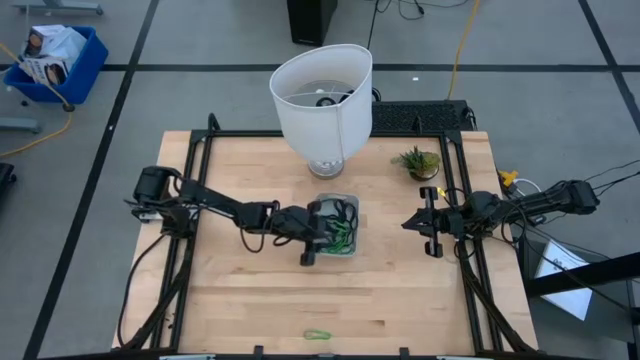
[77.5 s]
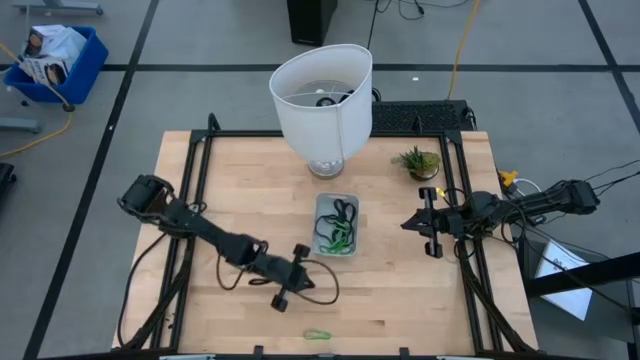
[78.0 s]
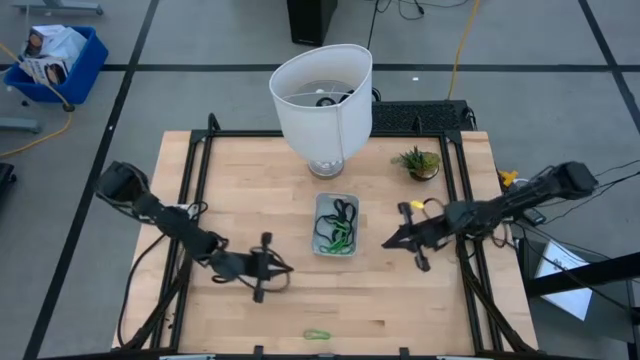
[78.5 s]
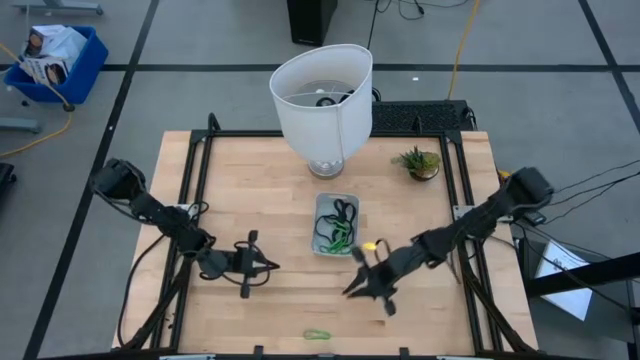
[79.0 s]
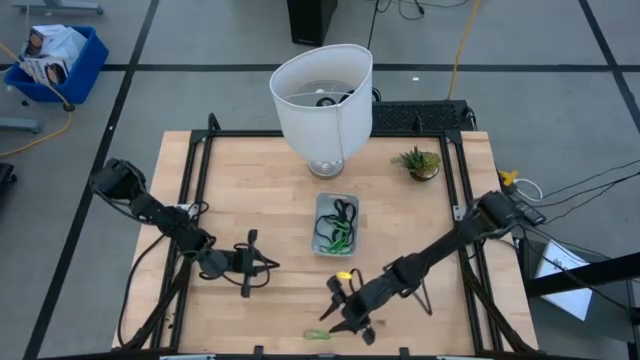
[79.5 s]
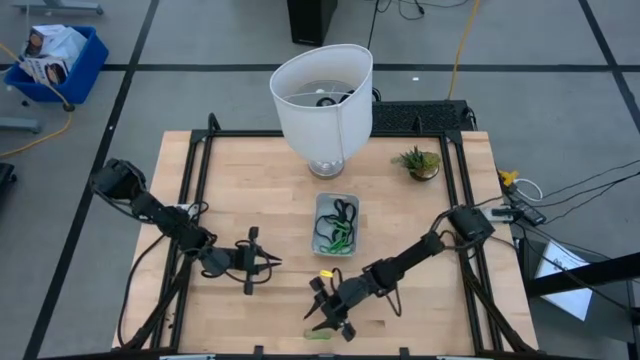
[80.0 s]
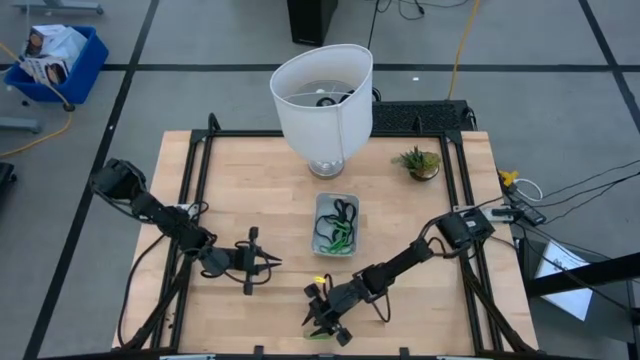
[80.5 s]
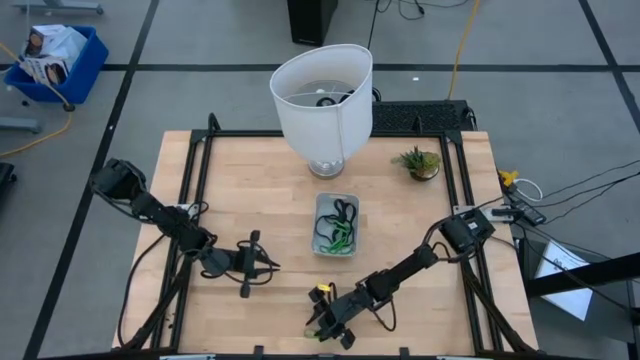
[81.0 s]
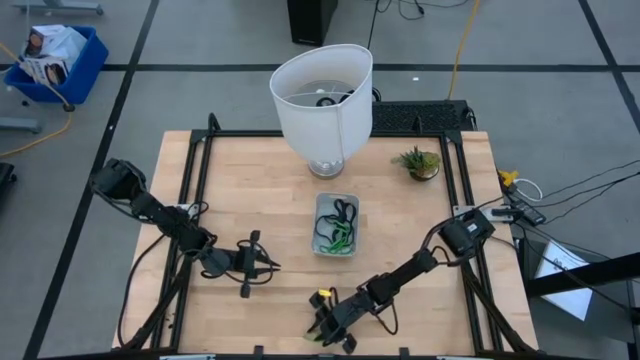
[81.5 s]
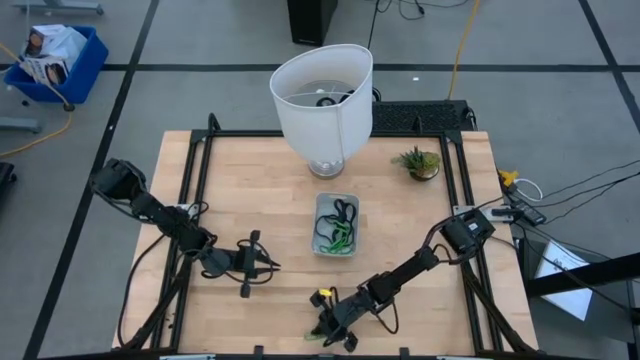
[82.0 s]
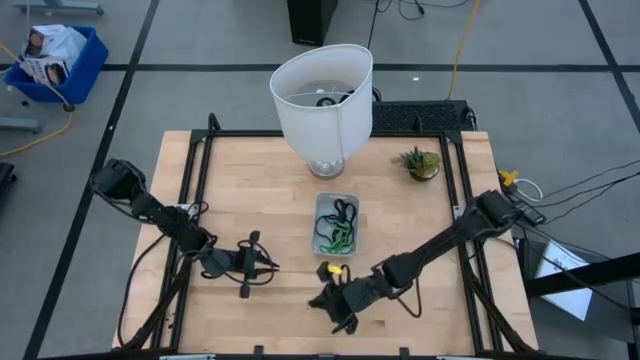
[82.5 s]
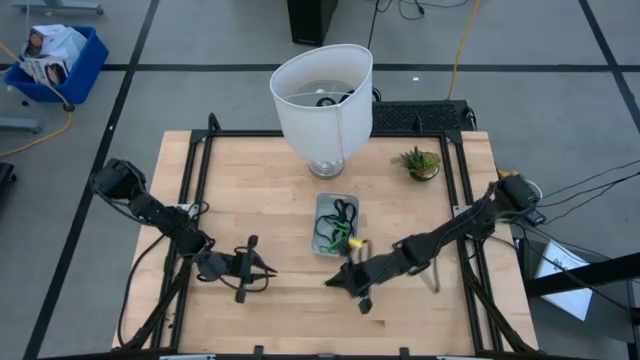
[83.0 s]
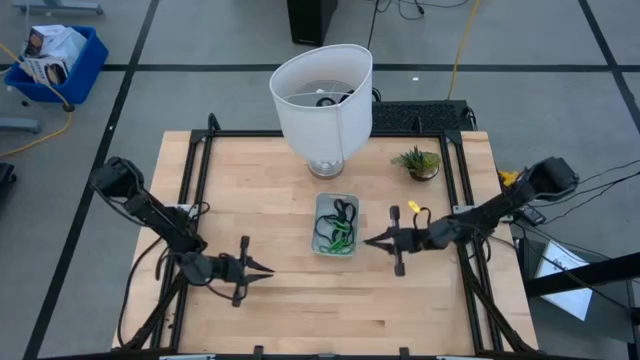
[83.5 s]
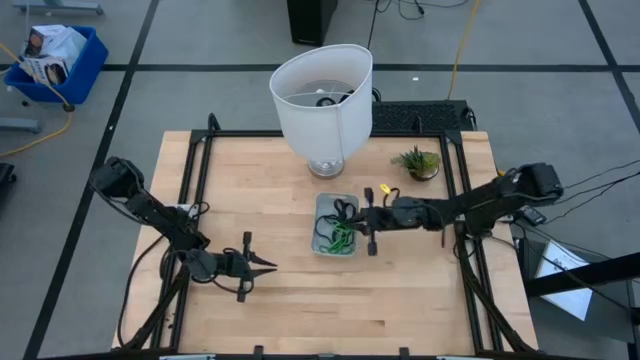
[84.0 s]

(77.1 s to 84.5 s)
Task: Pick and place rubber bands into bin
Put the green rubber band into the gray bin

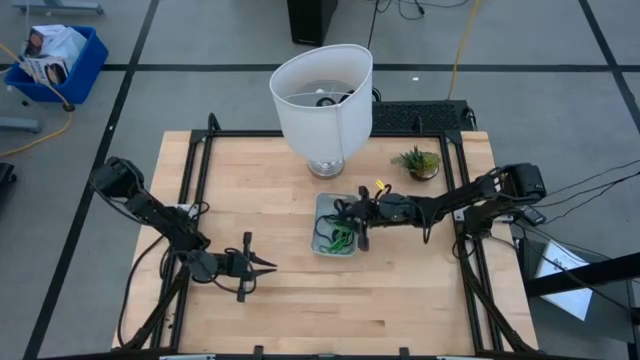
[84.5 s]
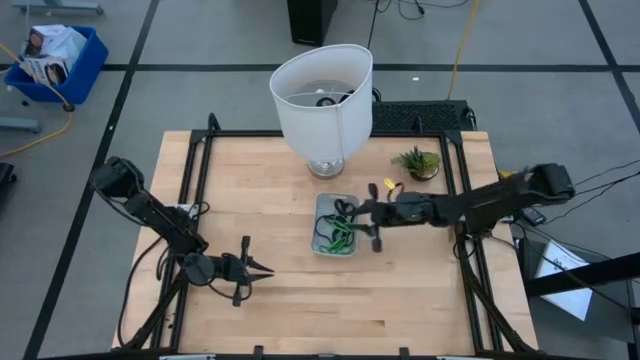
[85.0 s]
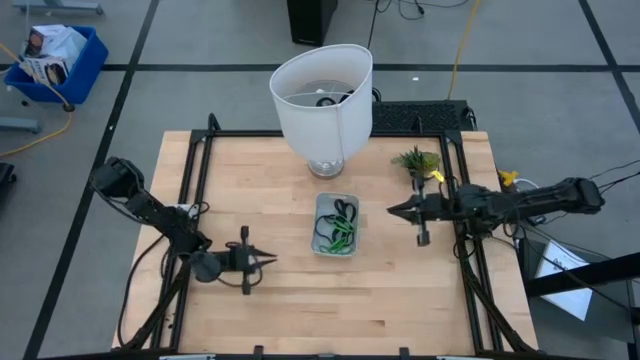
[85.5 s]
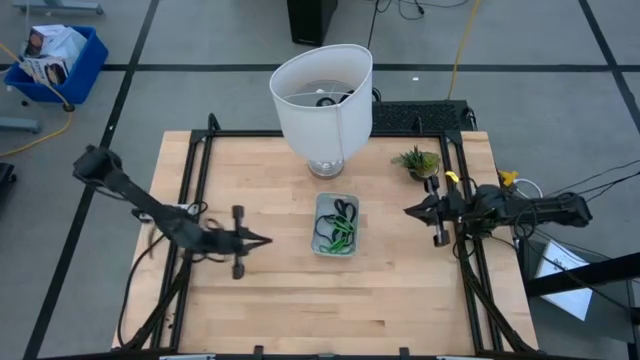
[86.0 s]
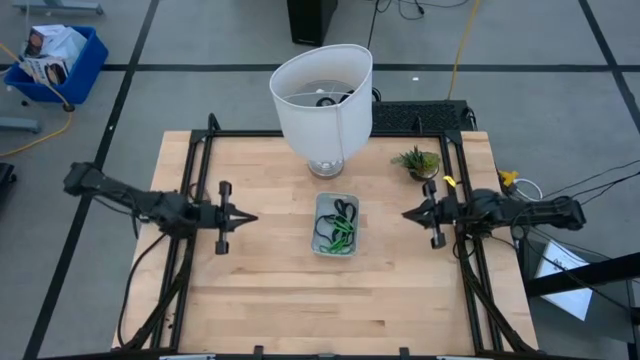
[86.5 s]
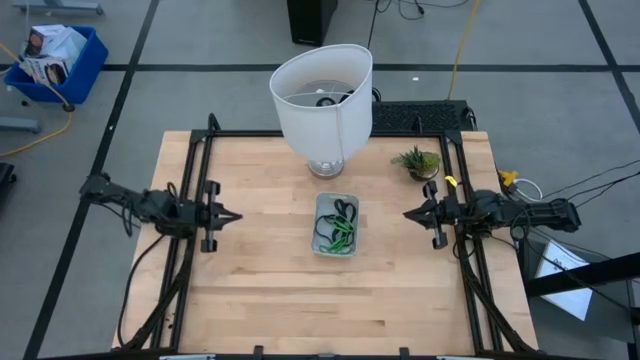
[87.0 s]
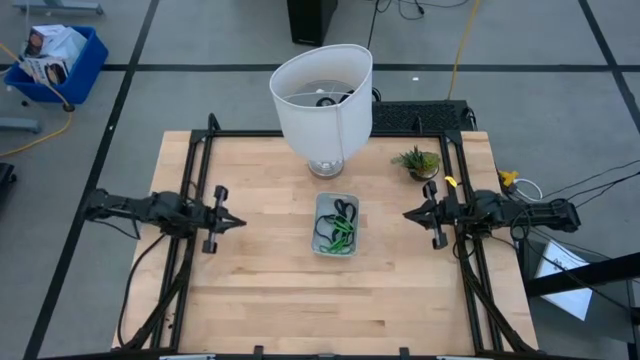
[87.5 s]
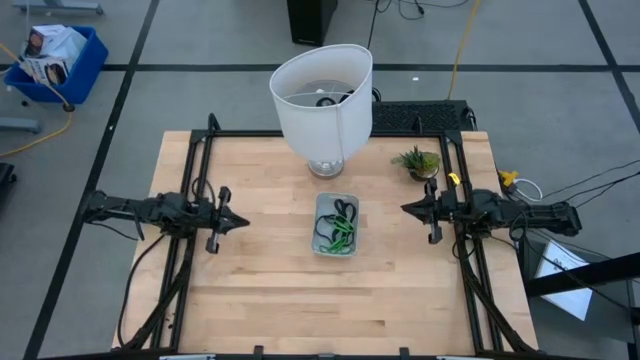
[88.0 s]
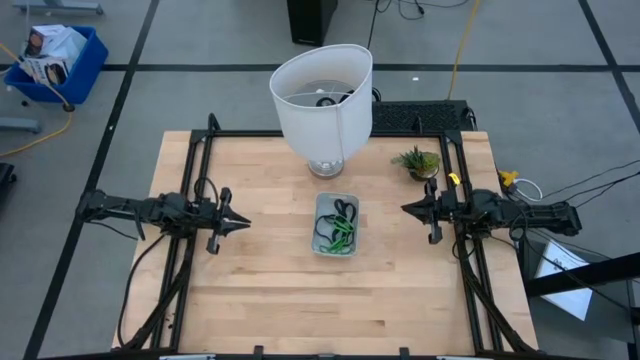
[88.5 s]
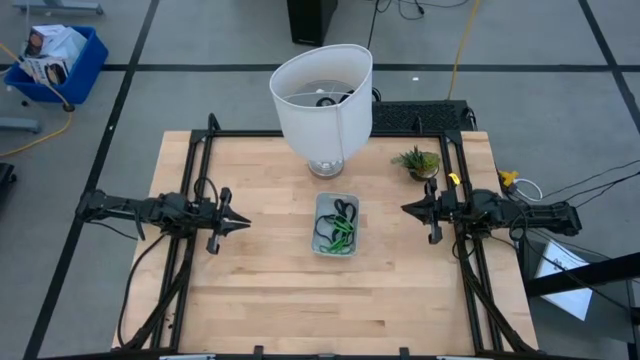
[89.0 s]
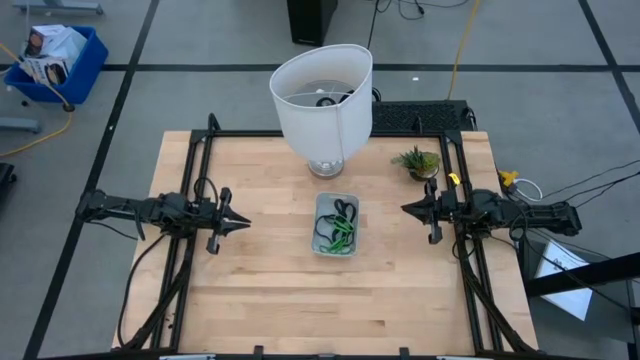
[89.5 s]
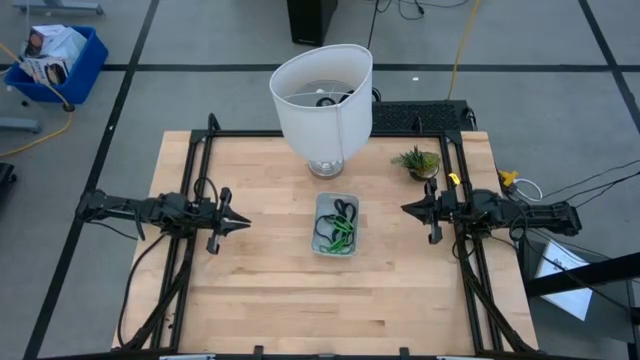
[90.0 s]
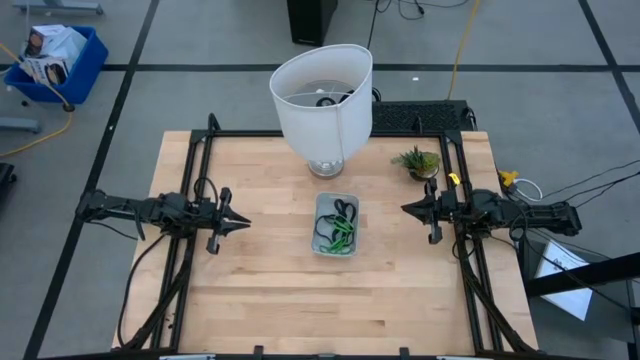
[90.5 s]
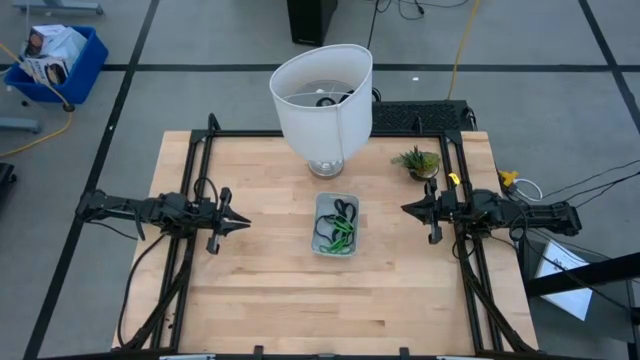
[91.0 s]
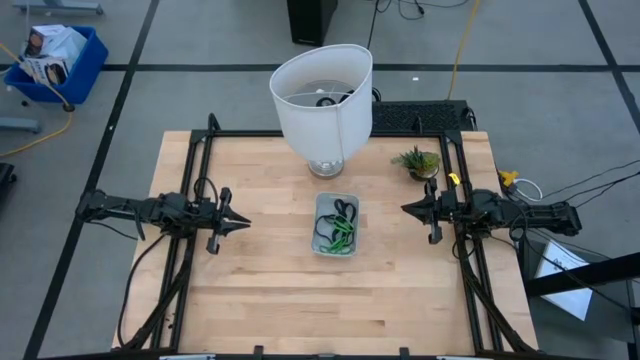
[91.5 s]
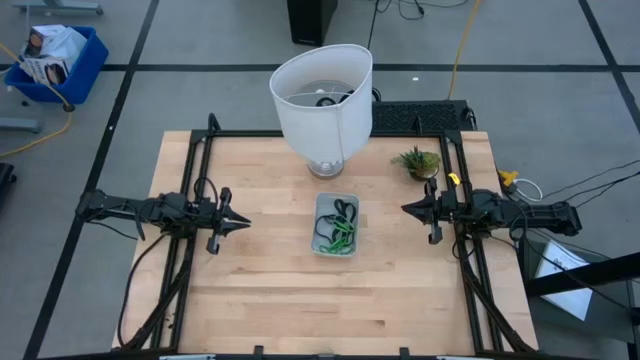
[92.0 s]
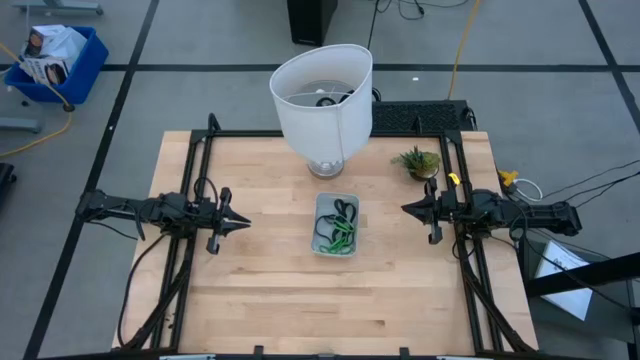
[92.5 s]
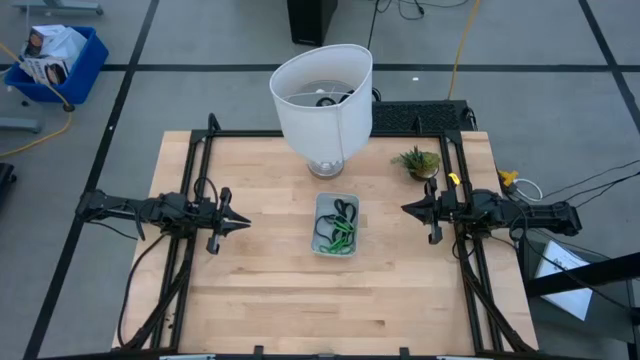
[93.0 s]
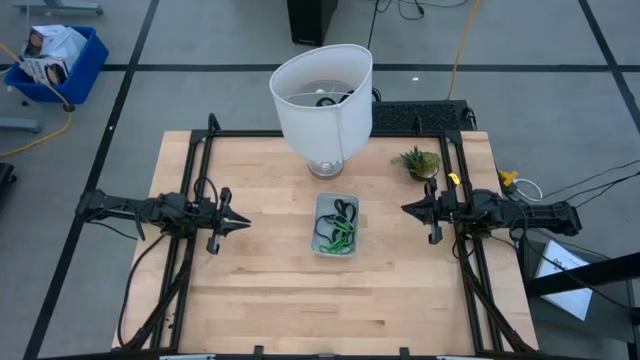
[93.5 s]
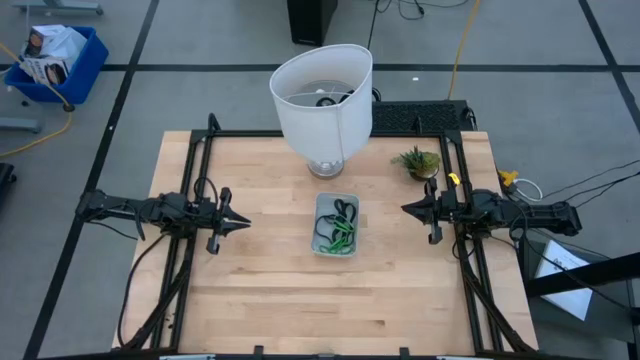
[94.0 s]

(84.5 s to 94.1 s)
Return to Home Position

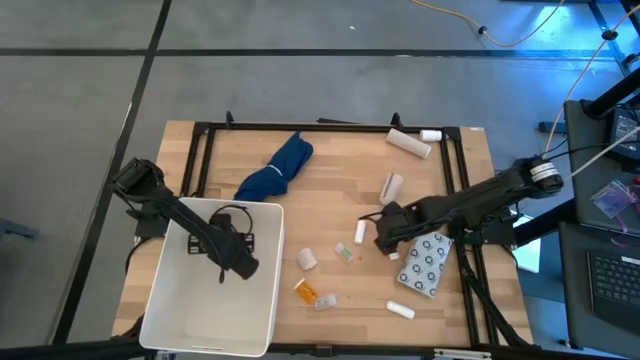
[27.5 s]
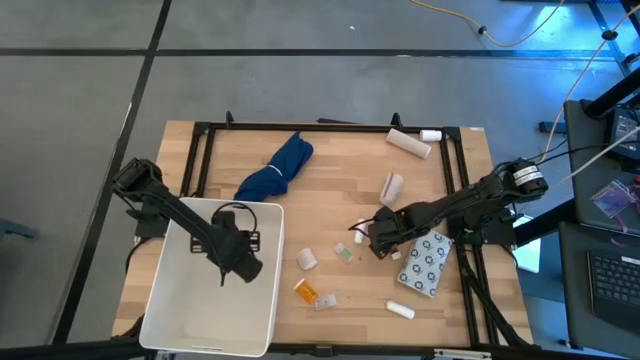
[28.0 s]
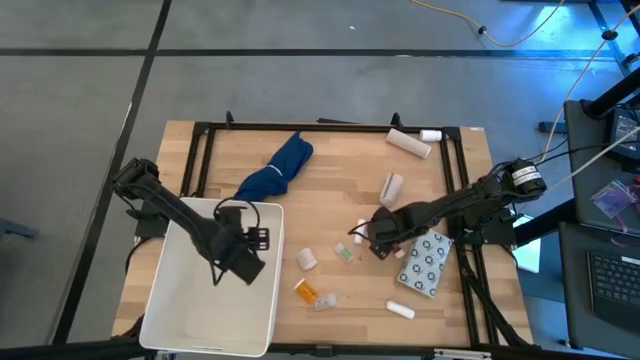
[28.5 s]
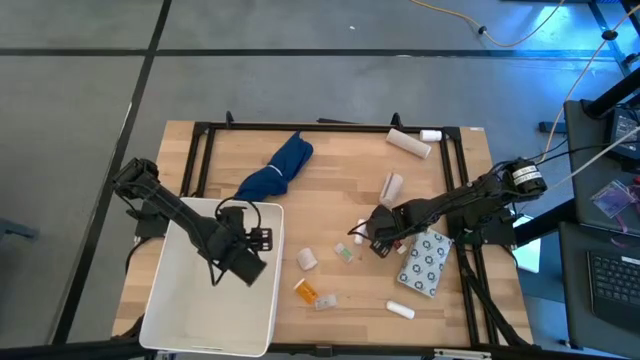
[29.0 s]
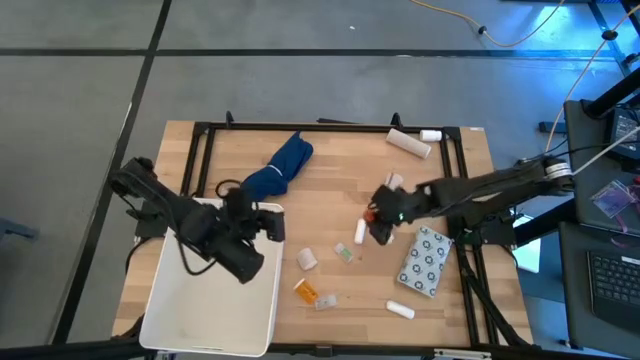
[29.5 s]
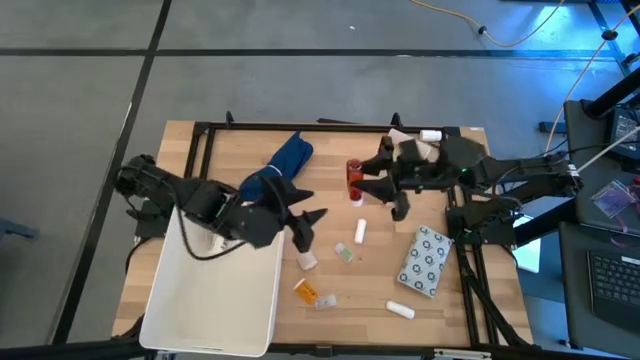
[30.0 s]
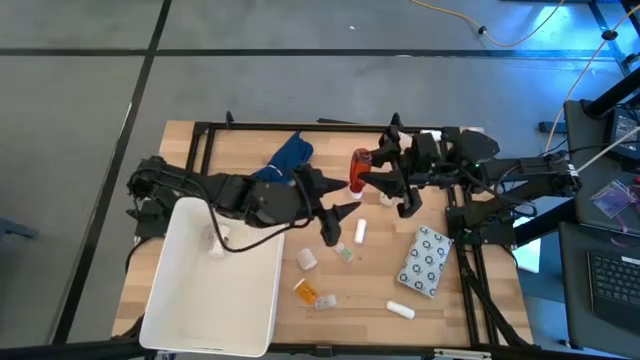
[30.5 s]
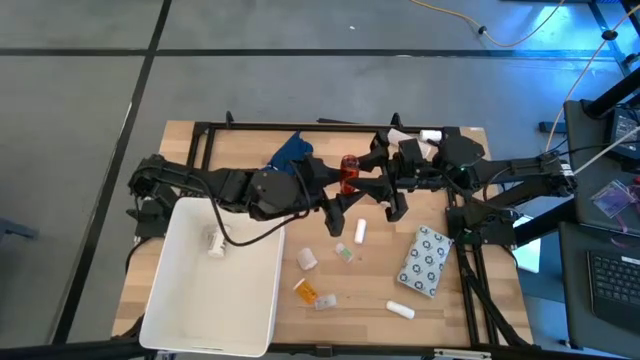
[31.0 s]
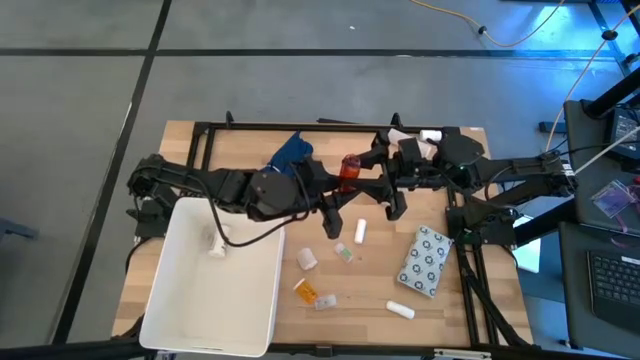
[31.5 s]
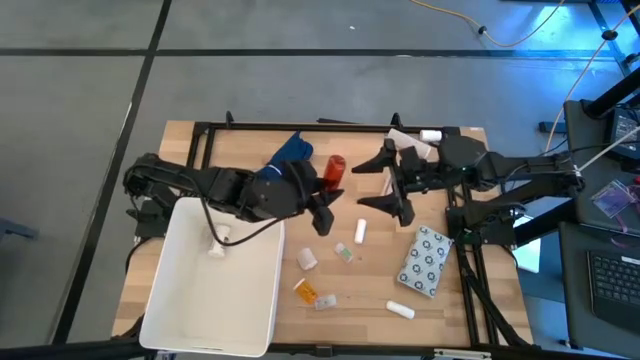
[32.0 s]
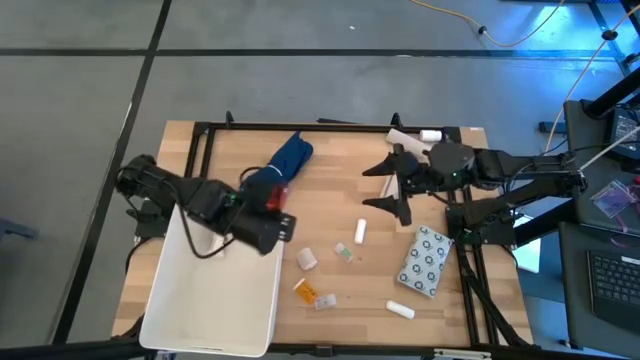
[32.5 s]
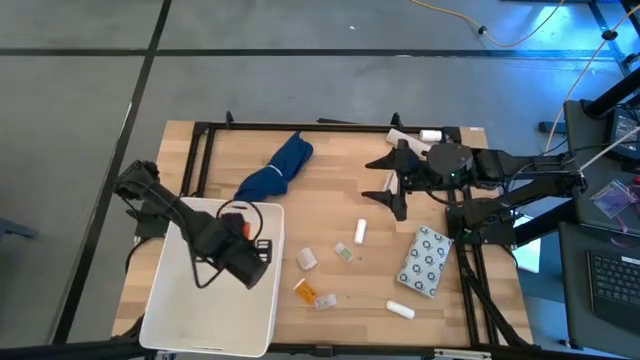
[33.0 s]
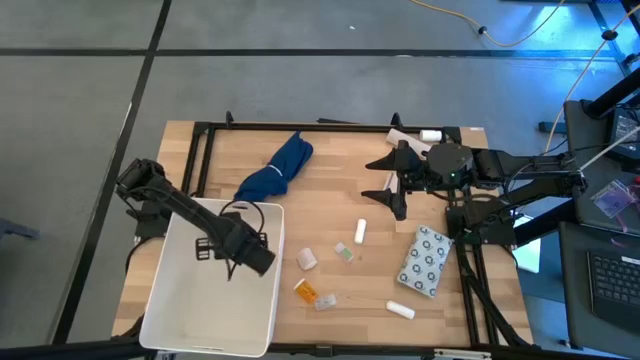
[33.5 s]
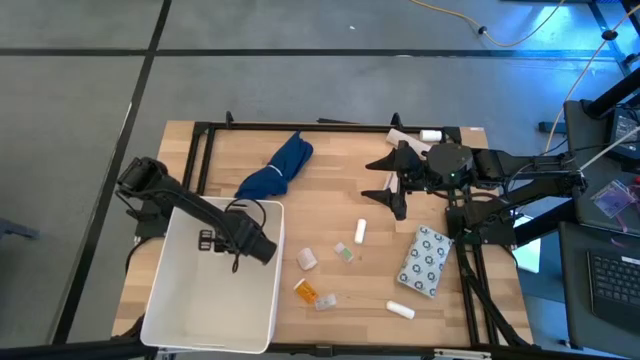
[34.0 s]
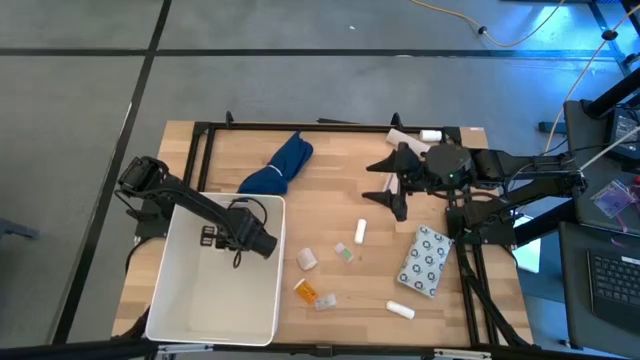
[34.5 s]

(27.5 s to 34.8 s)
Task: Pick & place medical supplies in basket/bin
Put the red medicine bottle into the white bin
